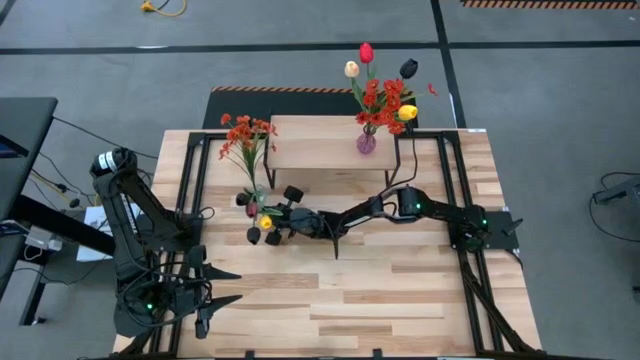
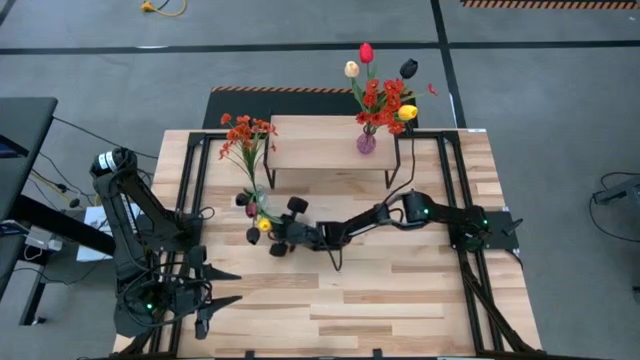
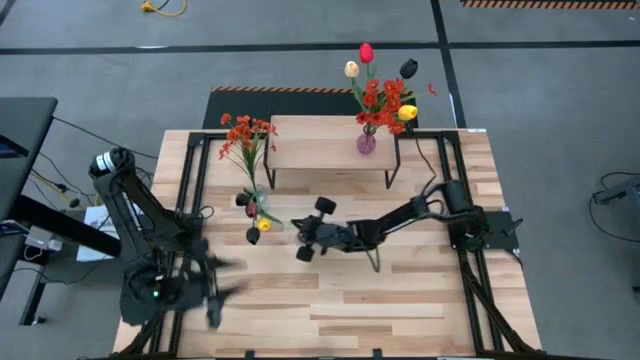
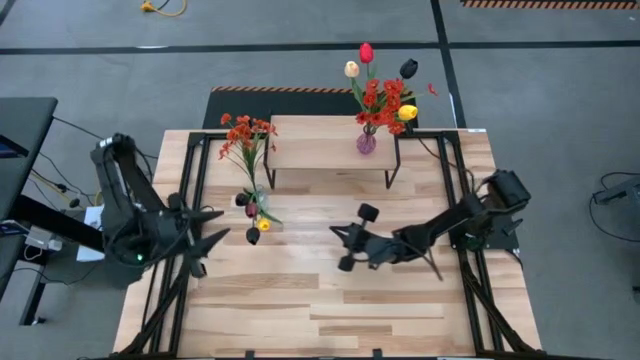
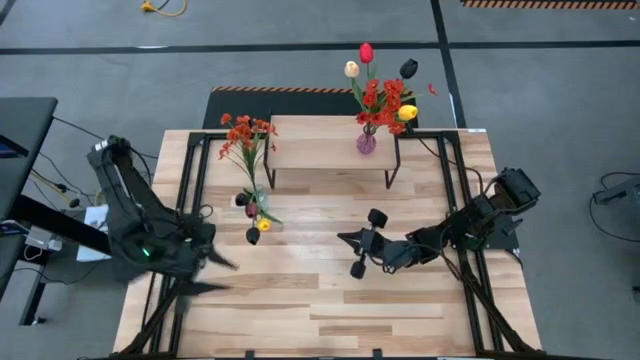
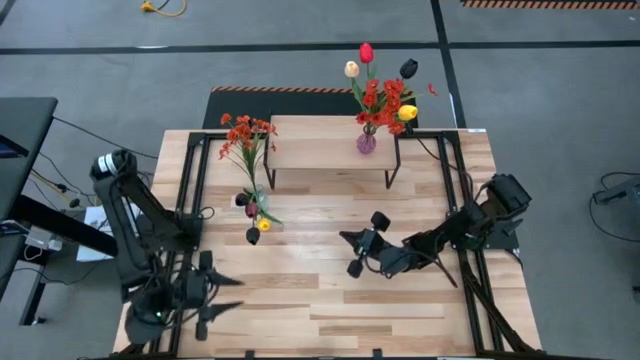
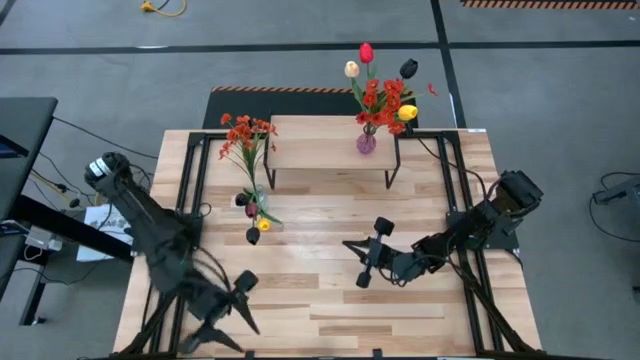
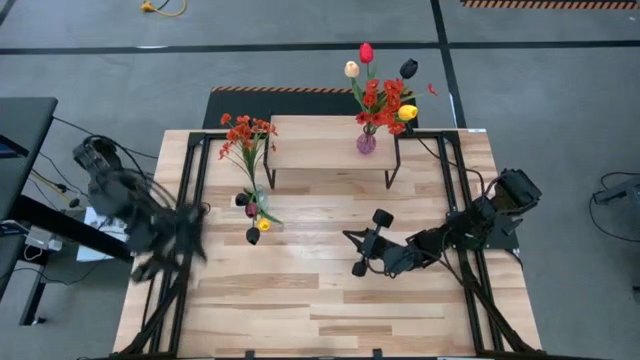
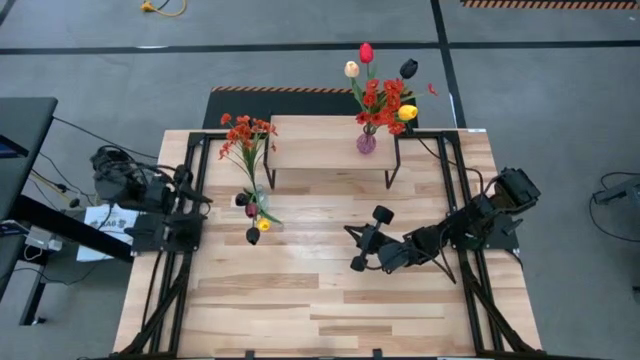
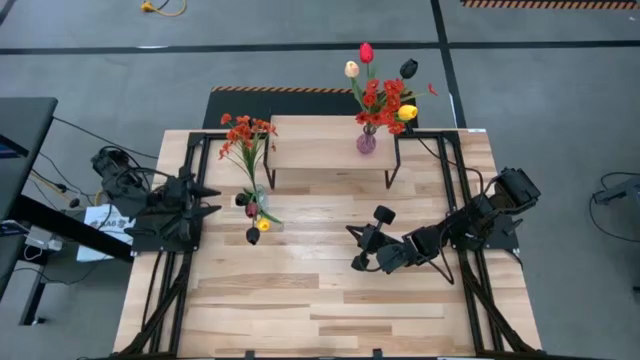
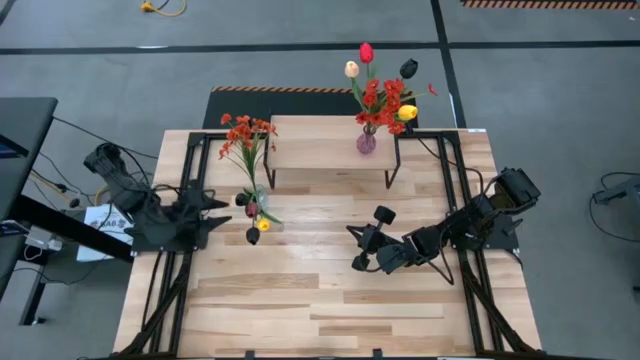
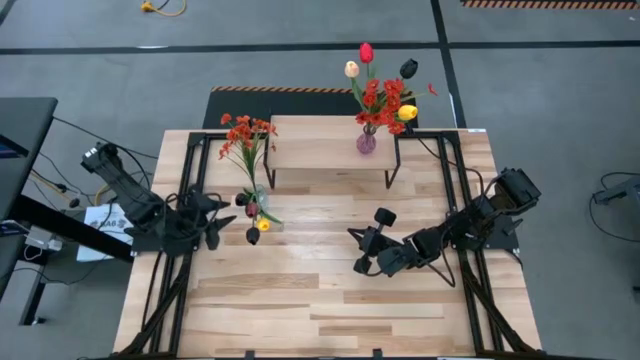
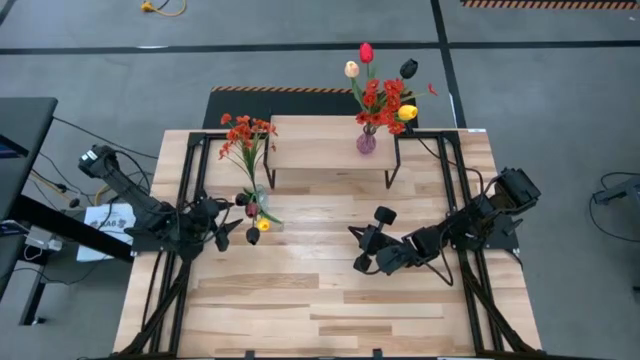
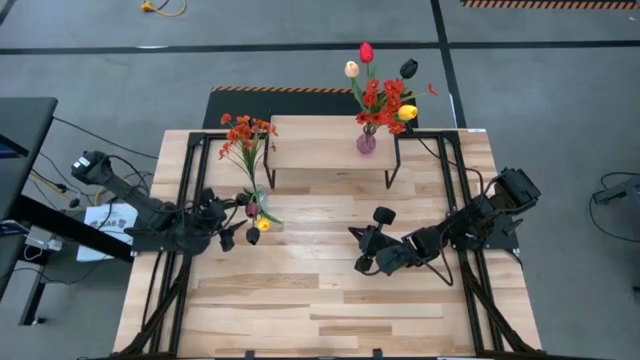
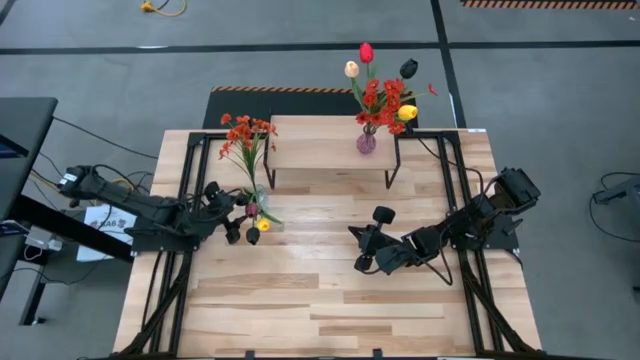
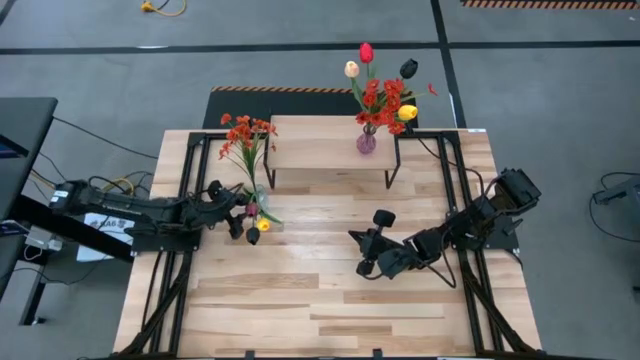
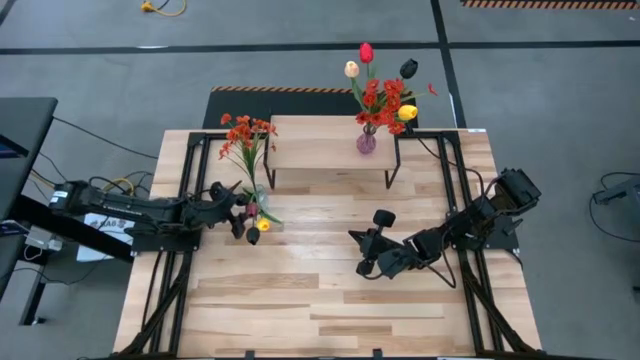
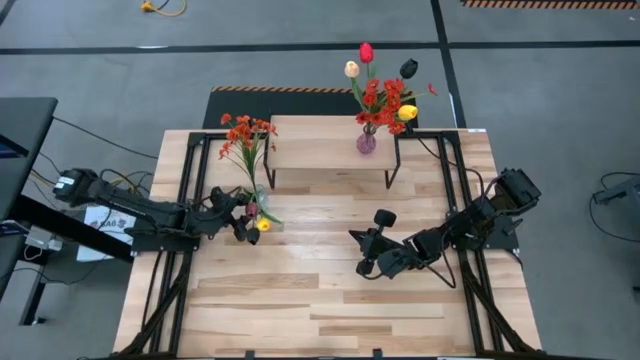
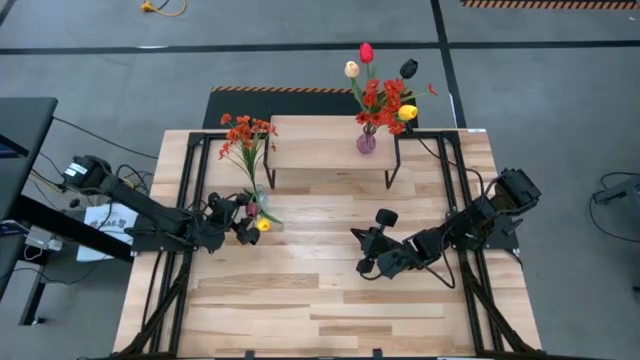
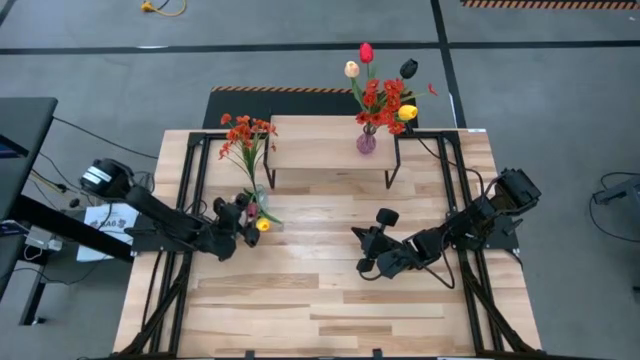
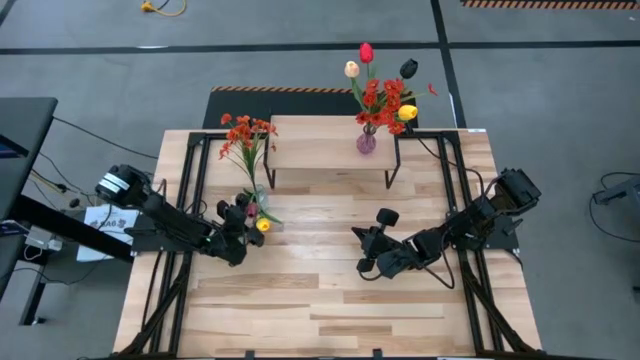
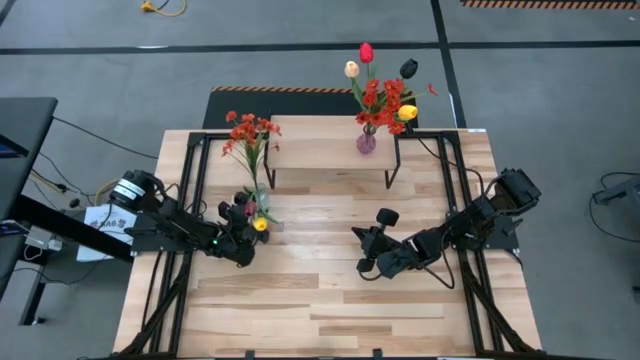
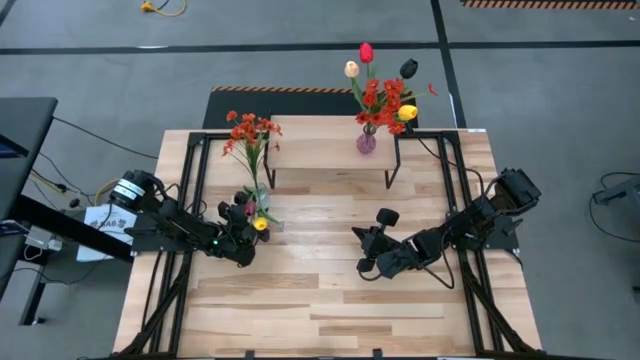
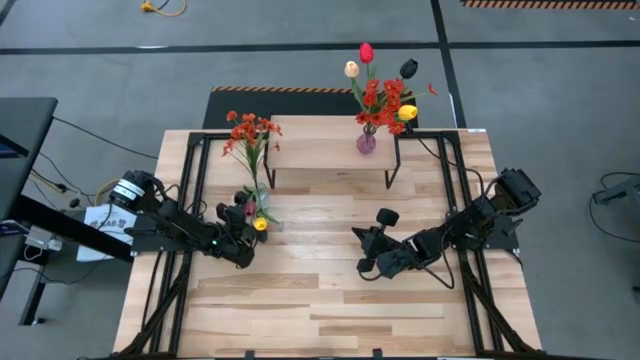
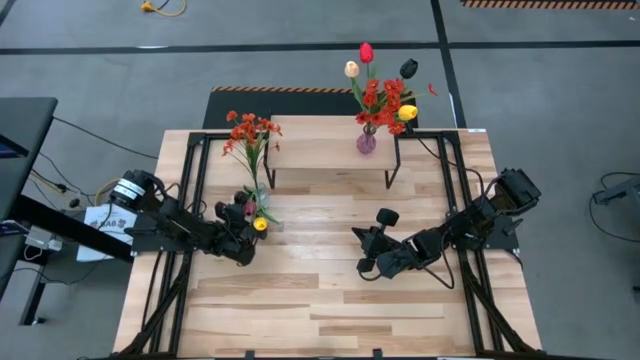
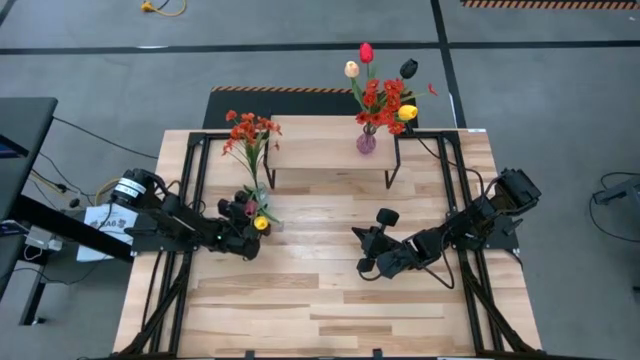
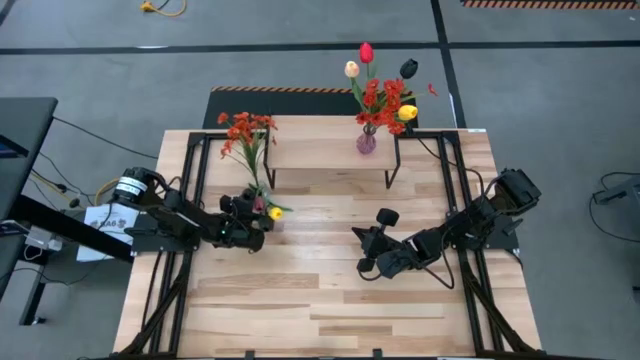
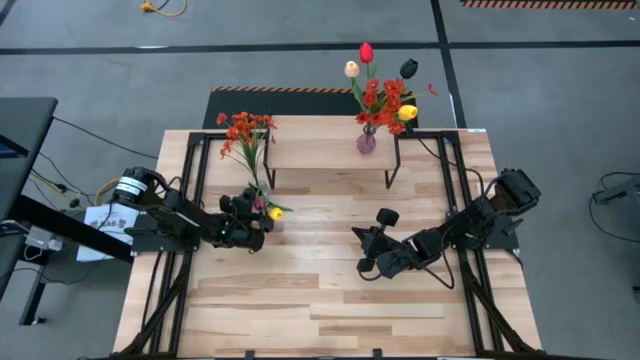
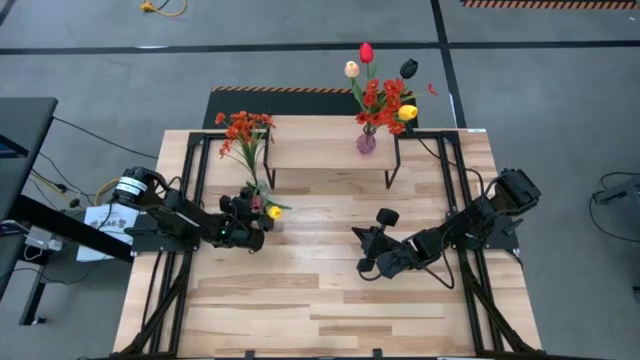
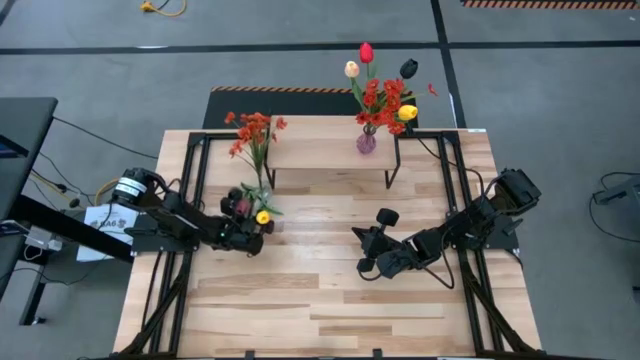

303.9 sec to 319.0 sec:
Task: Pick and place flowers into a vace then onto a shelf
Put the transparent vase with the flowers on the shelf

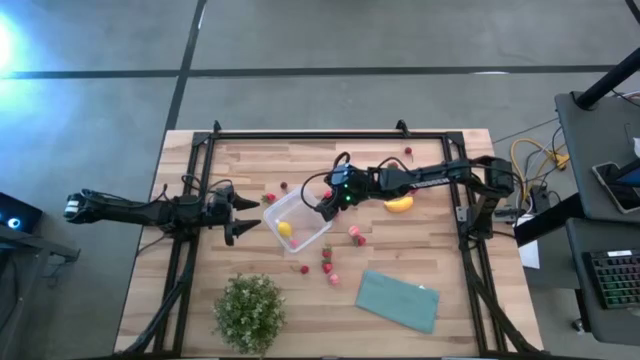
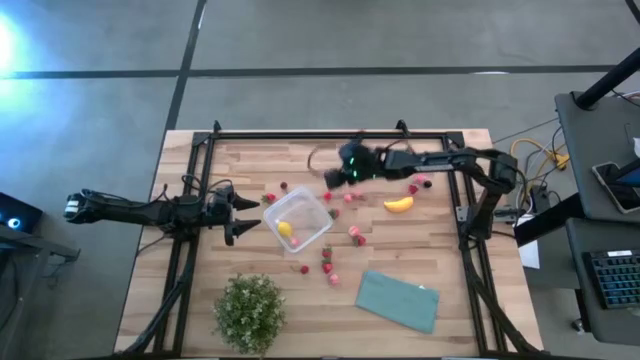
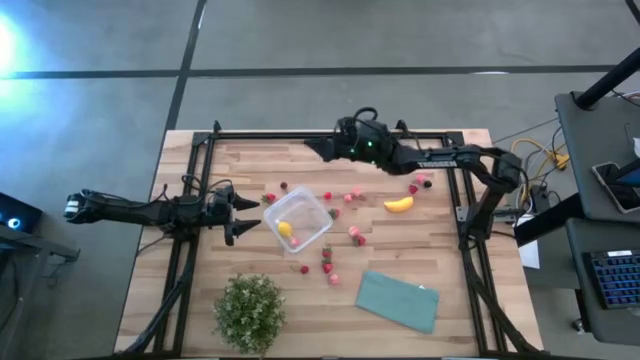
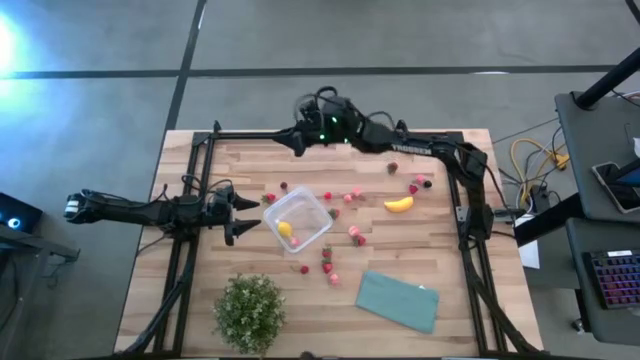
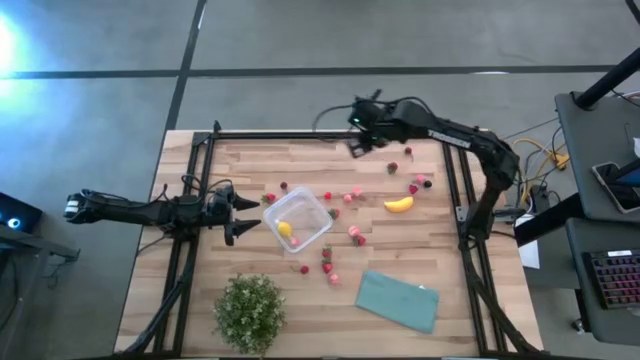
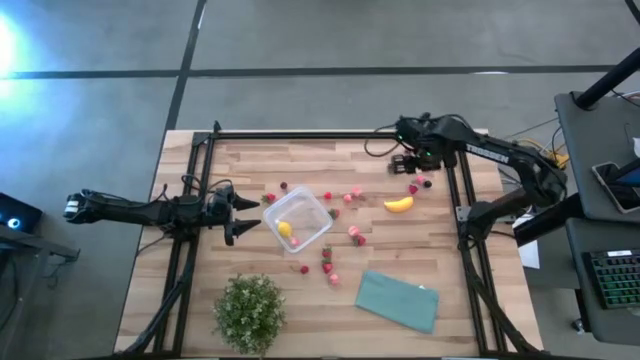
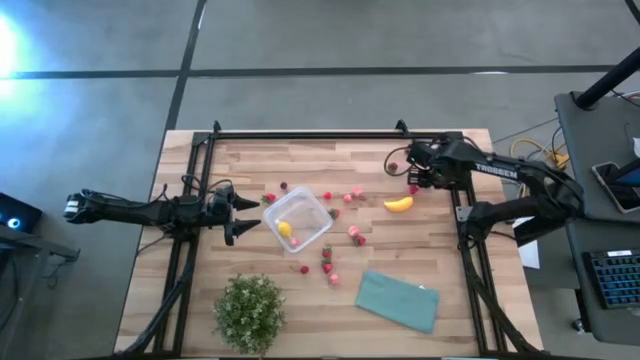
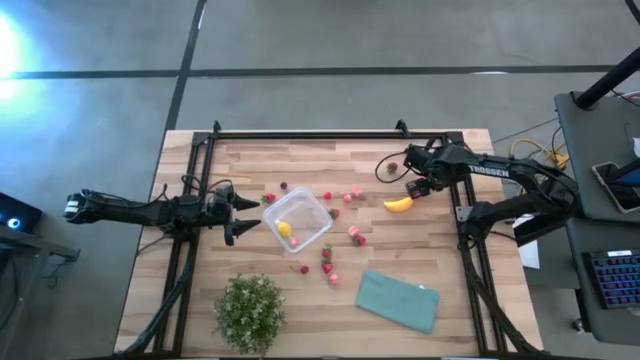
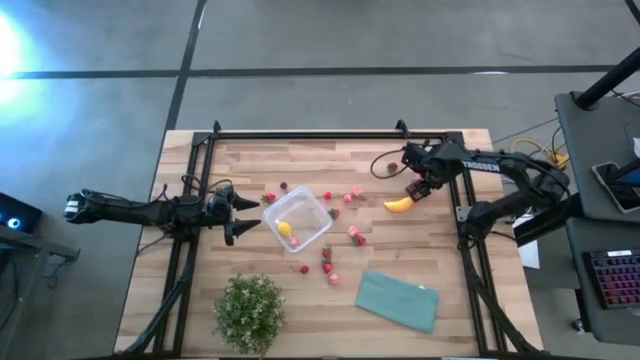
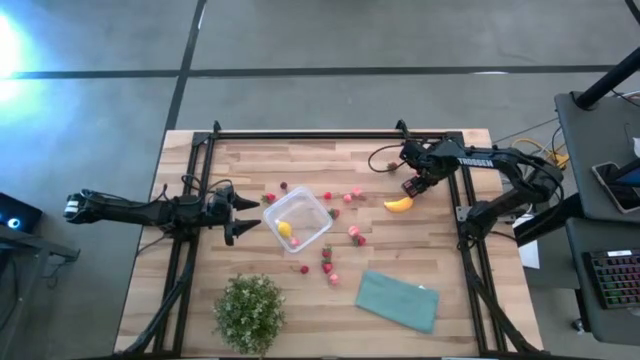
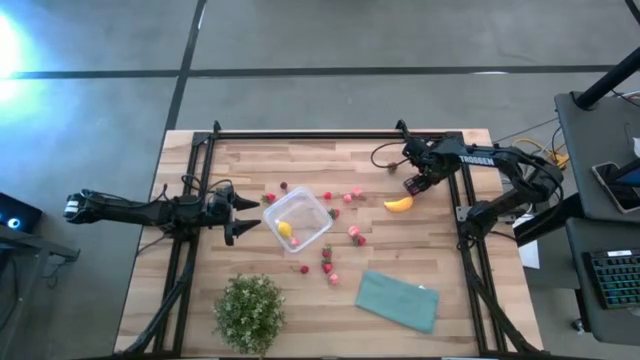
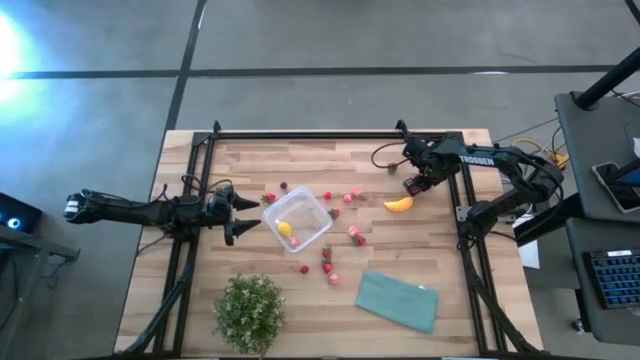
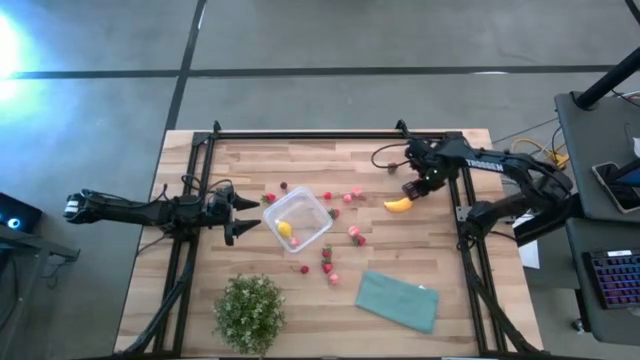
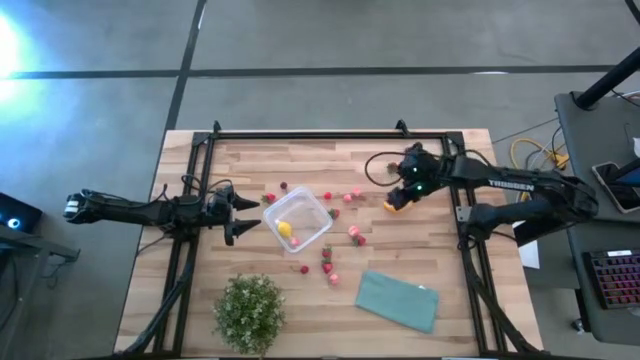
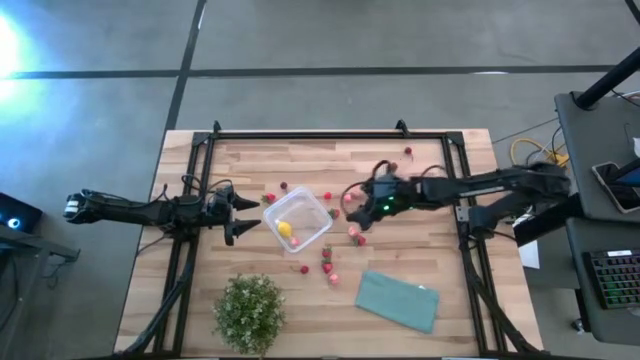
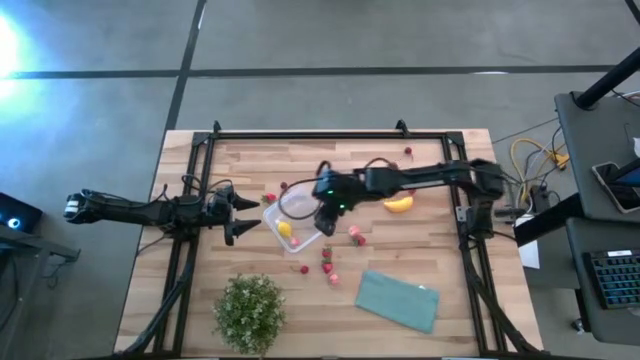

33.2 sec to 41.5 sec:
Task: Pick and placing Produce into tupperware
Put the black plum into the transparent bin
